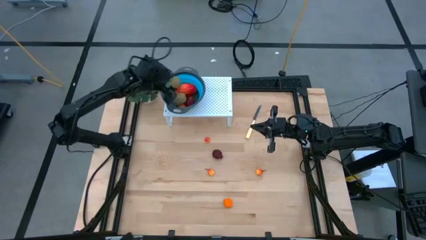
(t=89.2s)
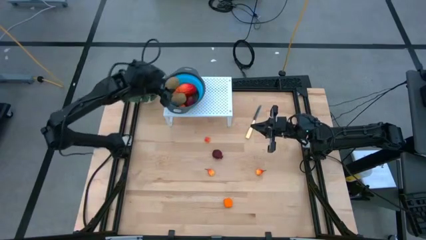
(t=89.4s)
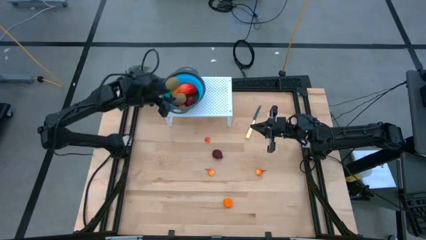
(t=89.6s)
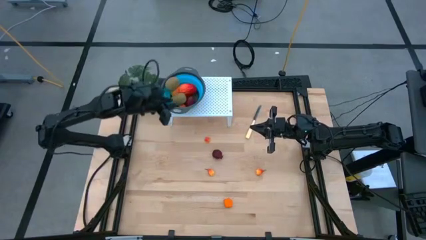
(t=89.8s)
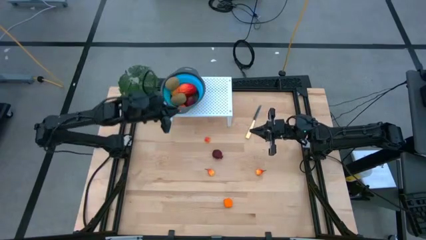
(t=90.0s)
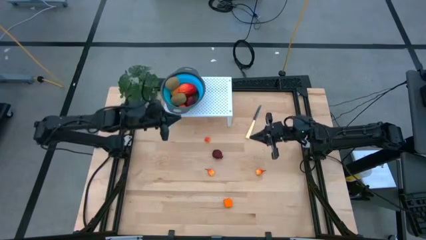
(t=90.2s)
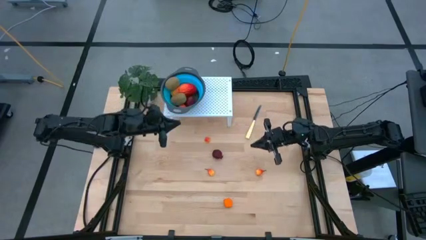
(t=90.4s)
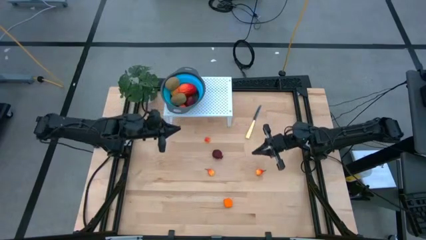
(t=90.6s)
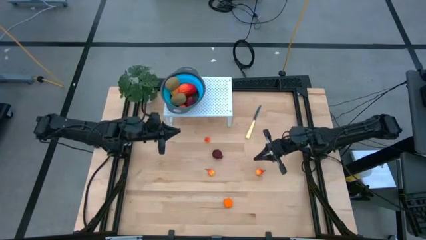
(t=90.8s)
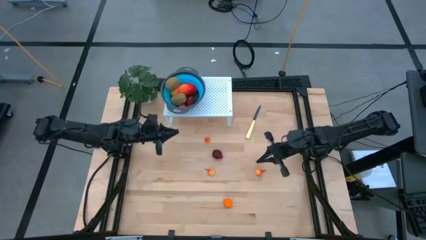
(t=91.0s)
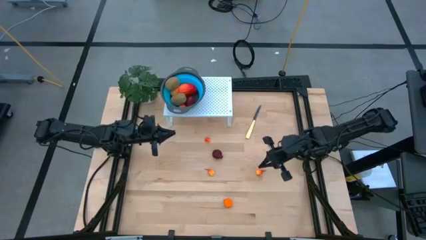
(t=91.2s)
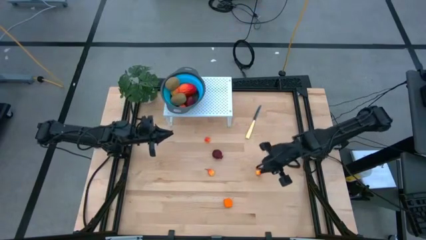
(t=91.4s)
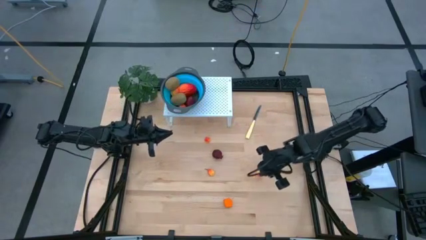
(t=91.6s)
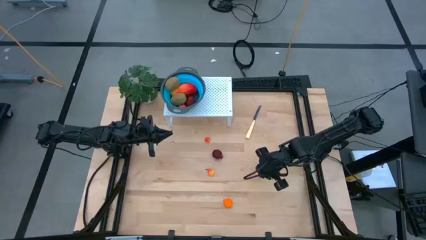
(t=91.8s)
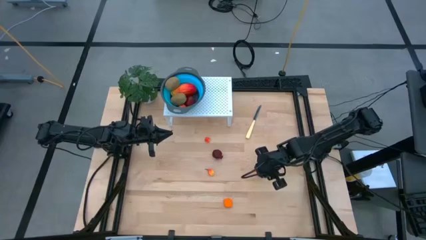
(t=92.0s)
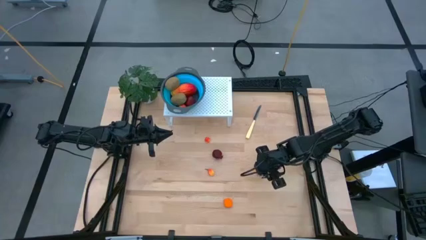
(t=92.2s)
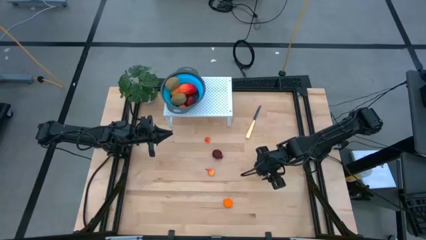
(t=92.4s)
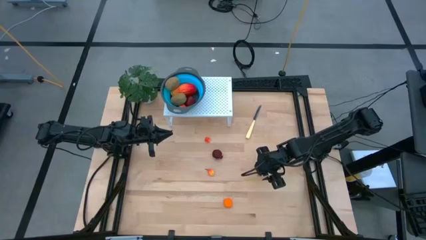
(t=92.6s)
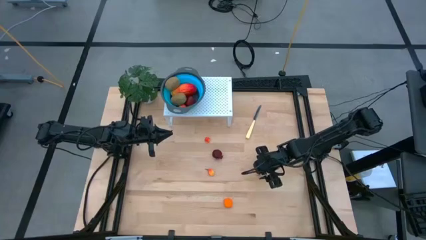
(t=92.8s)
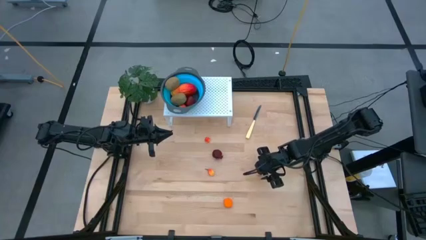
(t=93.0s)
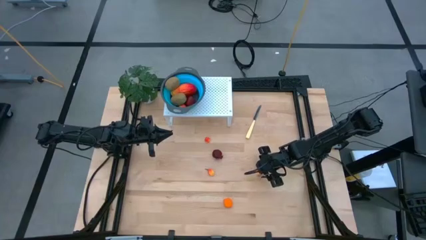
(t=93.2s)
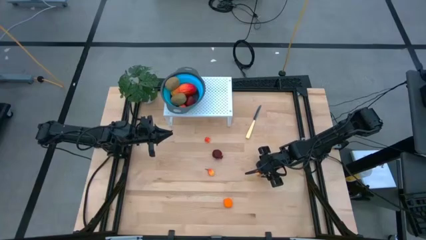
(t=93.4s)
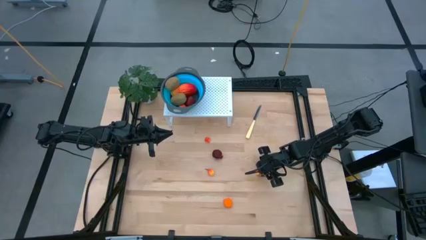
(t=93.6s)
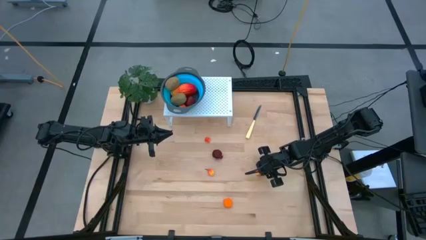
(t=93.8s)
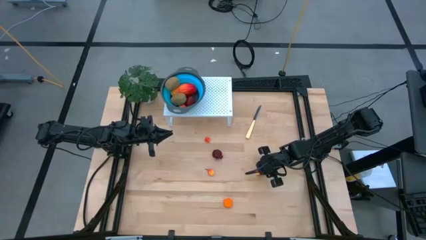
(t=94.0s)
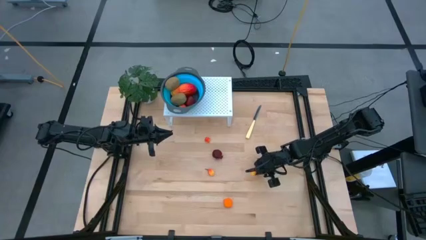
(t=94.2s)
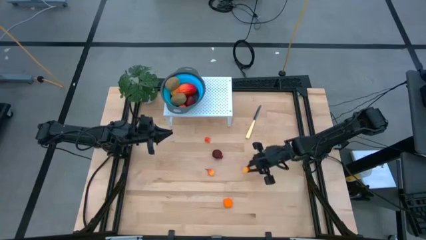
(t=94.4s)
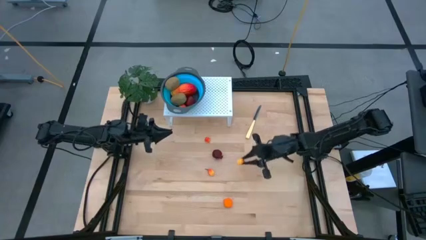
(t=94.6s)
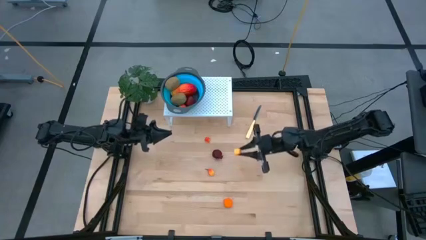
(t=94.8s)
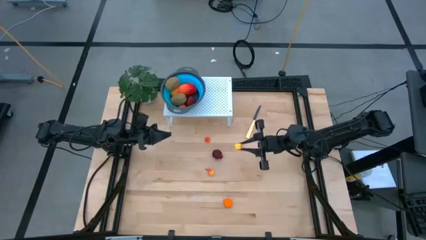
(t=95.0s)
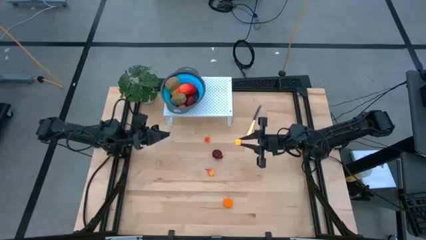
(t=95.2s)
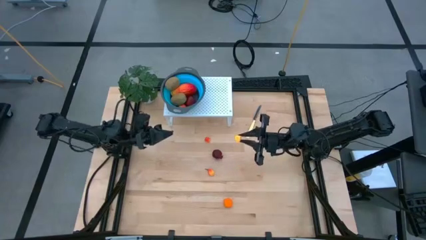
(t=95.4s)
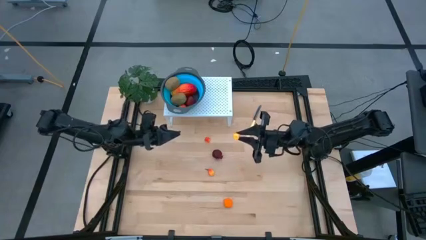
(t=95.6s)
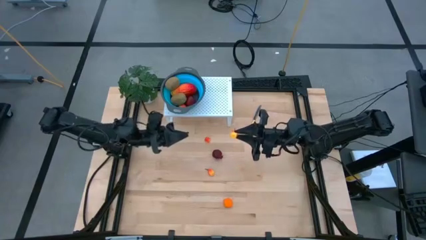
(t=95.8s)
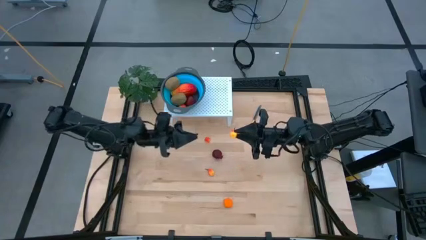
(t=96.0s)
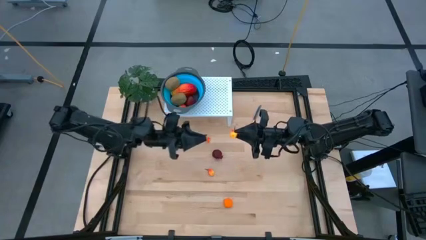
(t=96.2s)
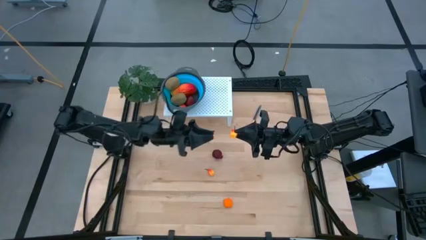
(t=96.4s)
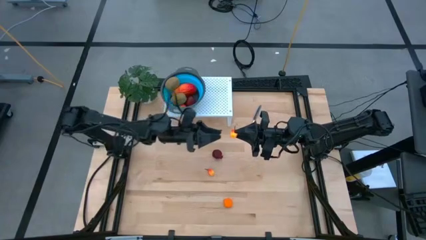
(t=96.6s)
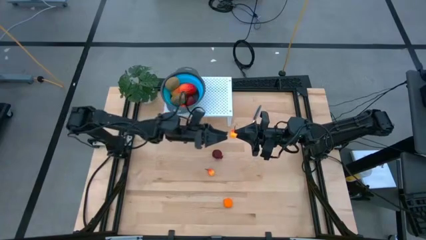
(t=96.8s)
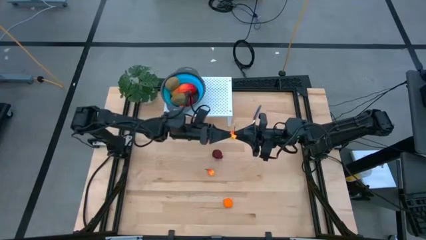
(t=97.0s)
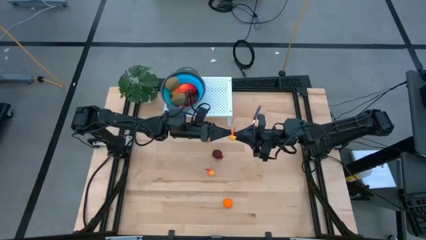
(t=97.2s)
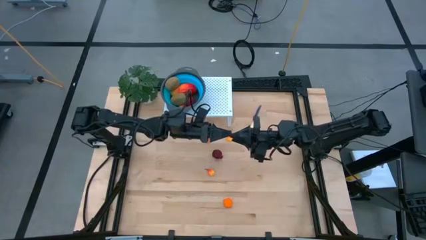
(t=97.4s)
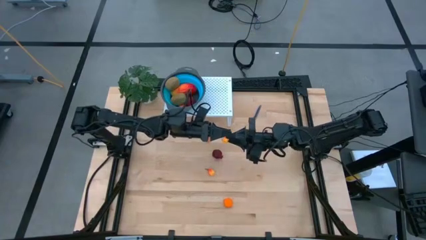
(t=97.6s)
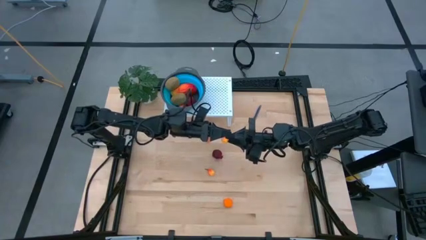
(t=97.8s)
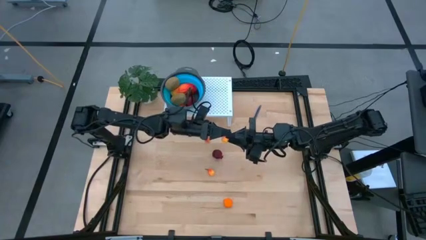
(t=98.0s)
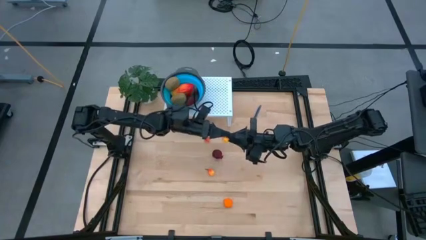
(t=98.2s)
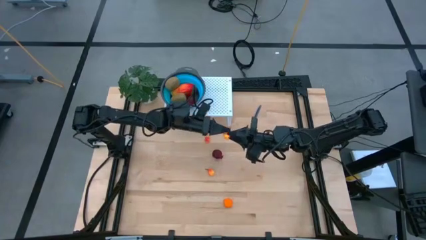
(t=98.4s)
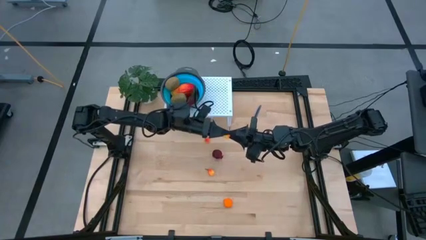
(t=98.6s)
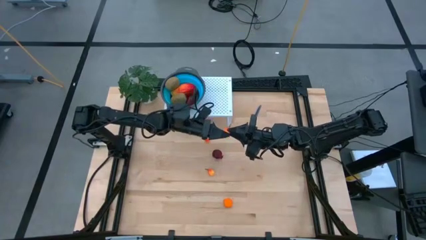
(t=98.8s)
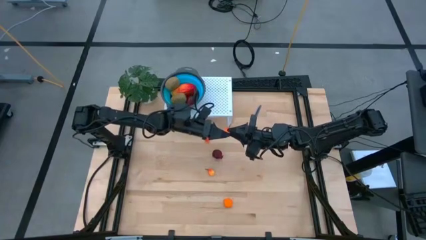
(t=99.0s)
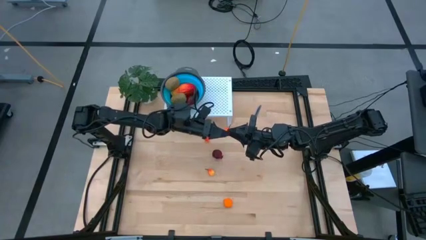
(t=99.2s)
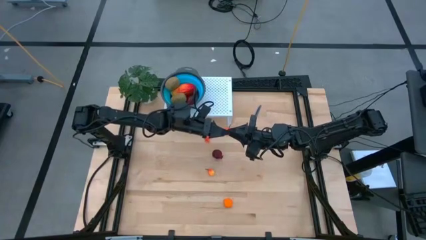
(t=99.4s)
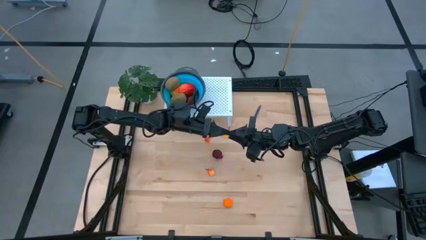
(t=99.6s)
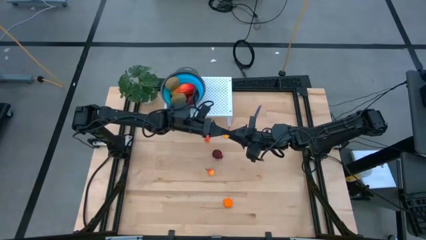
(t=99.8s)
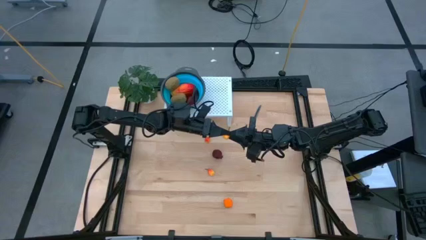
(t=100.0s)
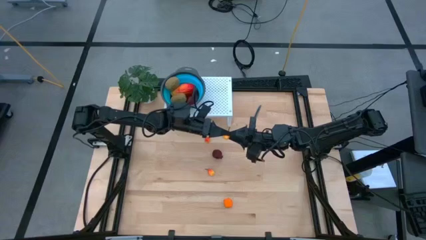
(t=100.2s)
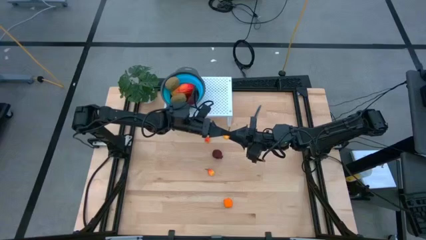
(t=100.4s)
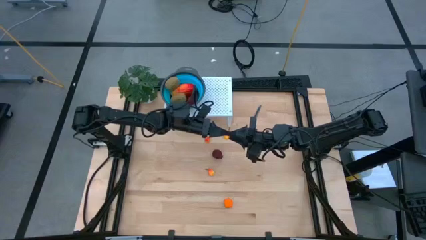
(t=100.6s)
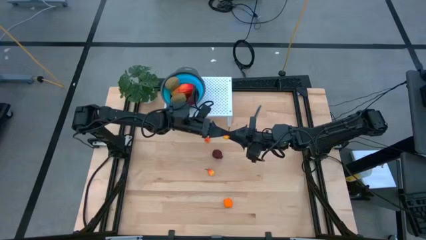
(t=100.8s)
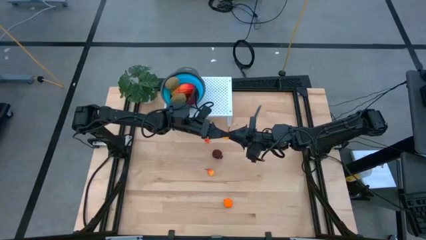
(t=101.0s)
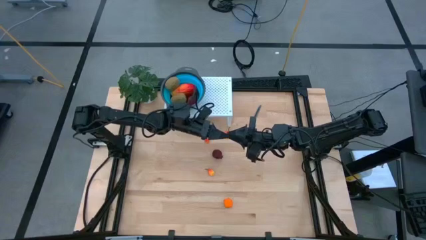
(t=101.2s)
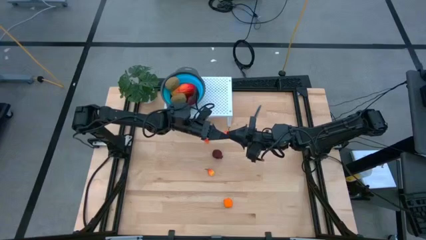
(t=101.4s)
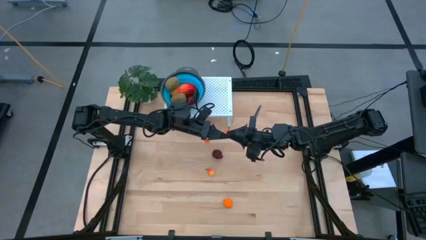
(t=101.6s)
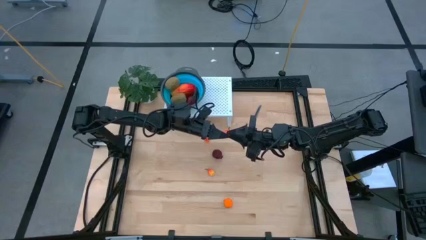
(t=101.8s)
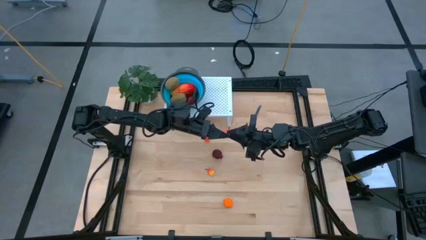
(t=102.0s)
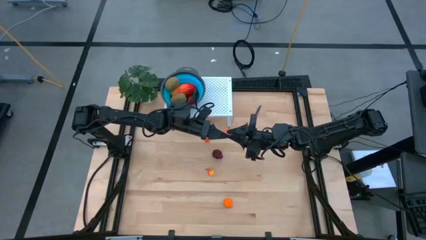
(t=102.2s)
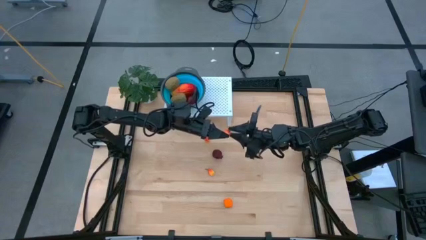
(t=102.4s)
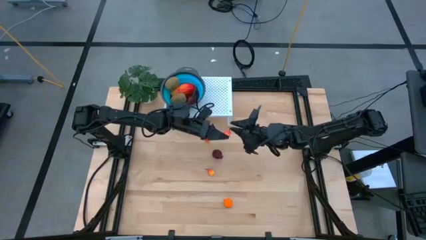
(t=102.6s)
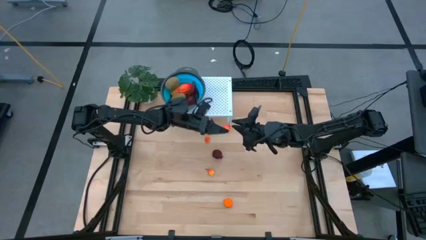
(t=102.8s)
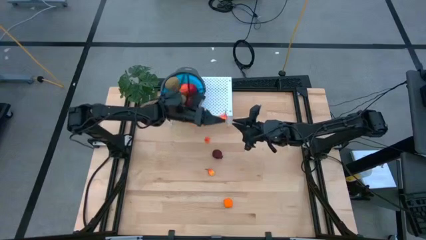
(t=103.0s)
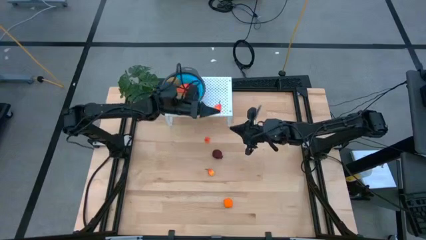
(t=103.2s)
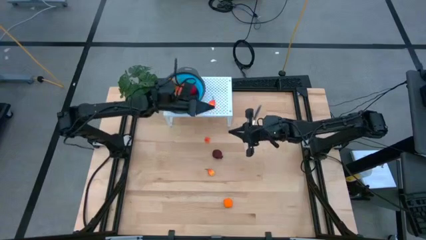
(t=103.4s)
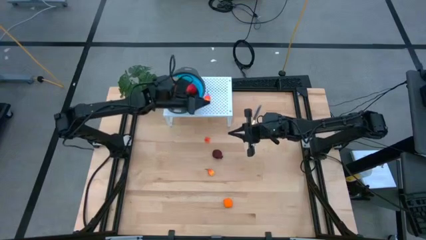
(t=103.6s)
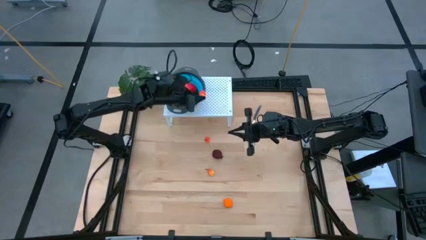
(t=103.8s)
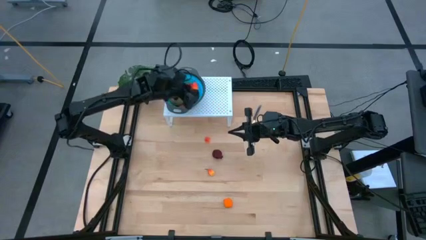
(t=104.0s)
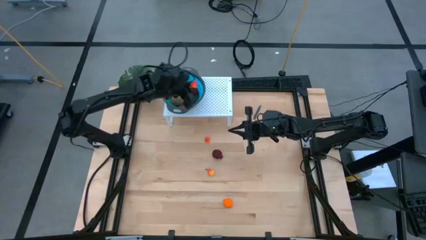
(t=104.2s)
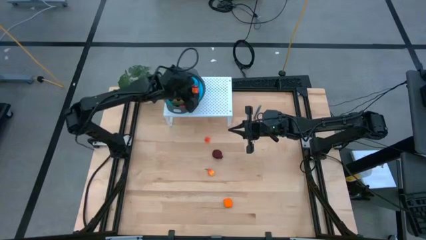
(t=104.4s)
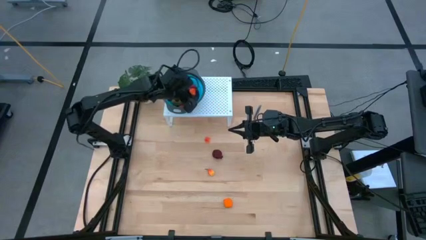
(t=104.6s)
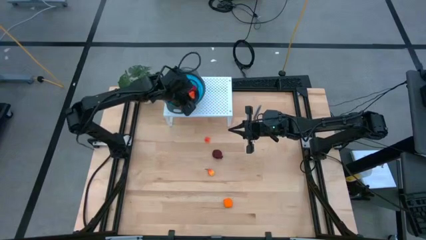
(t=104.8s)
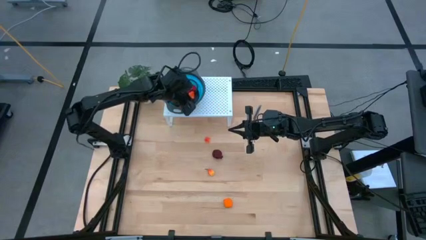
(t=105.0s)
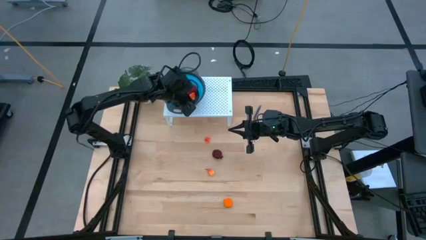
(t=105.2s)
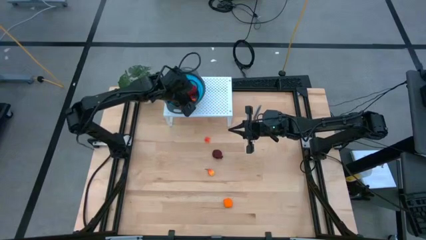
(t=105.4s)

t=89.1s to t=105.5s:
Task: Pick & Place Fruit
Put the peas into the strainer bowl on the shelf
